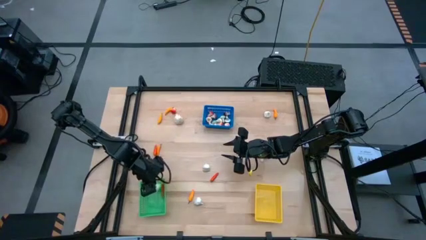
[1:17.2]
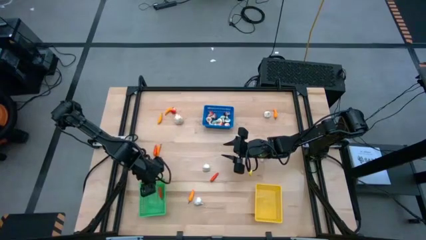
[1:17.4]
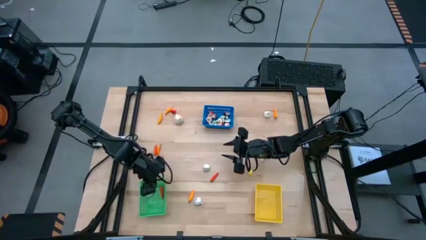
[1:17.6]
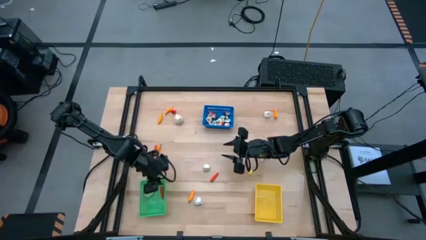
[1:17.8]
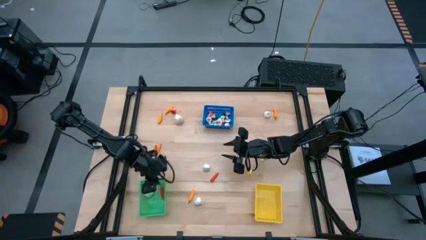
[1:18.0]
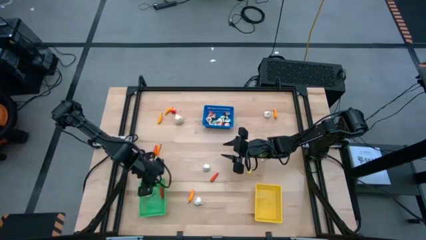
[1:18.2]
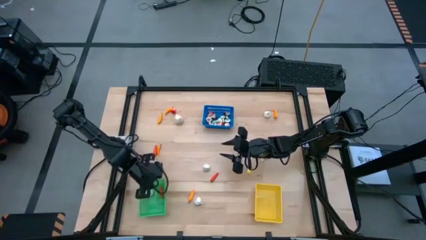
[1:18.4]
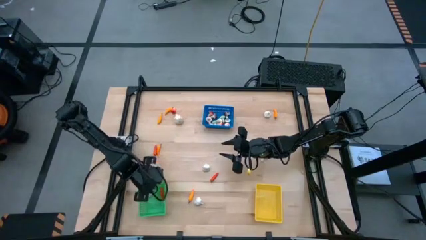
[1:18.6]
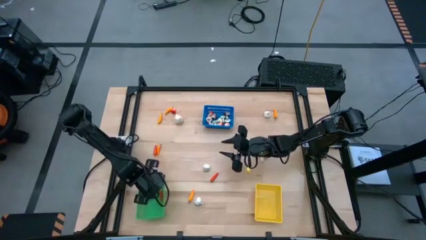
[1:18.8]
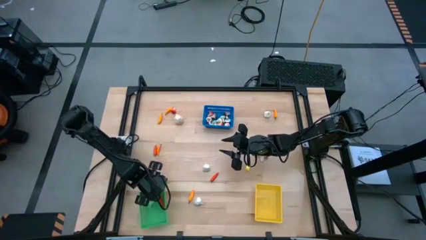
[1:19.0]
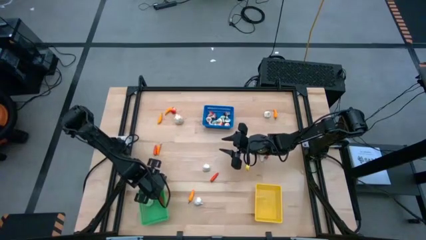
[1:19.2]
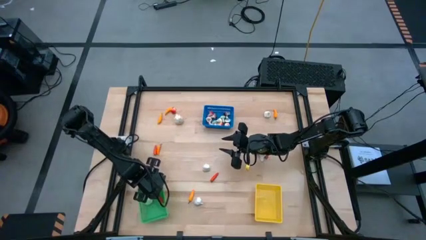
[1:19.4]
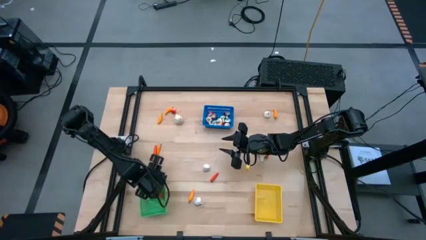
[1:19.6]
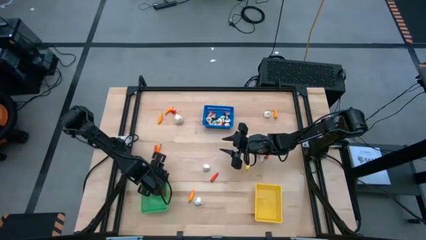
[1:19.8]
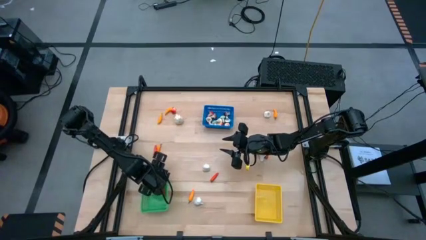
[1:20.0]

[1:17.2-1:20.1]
Task: Sort produce into baskets
Adjust the green bin

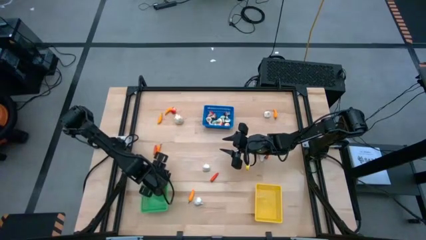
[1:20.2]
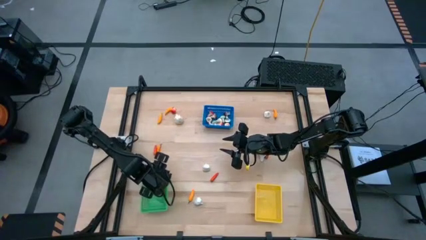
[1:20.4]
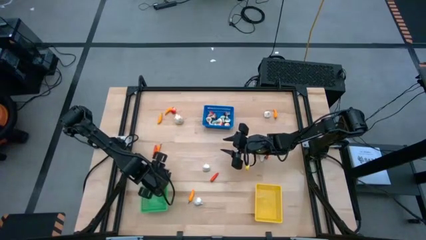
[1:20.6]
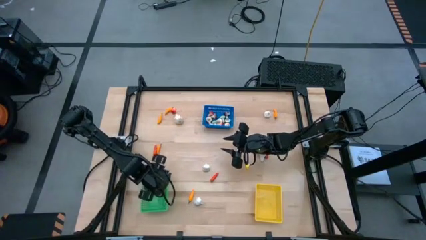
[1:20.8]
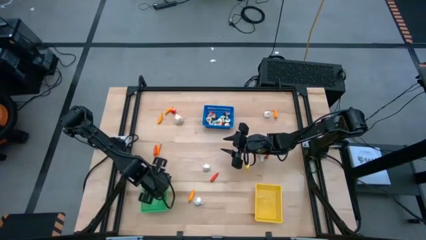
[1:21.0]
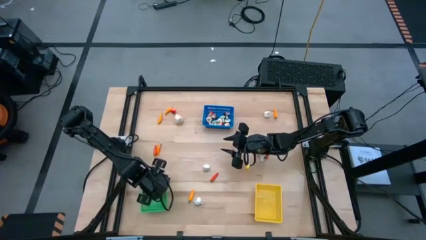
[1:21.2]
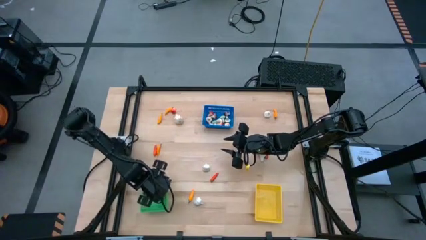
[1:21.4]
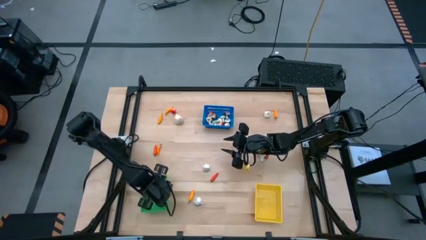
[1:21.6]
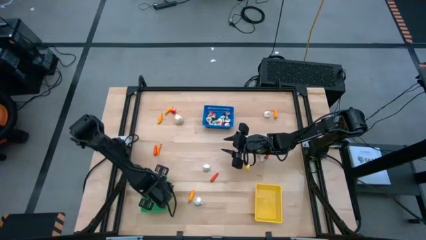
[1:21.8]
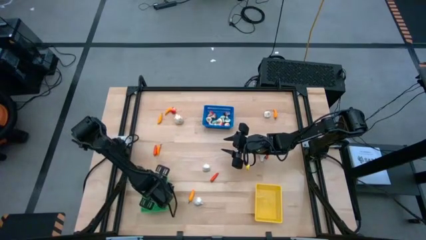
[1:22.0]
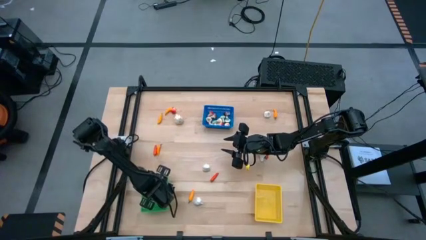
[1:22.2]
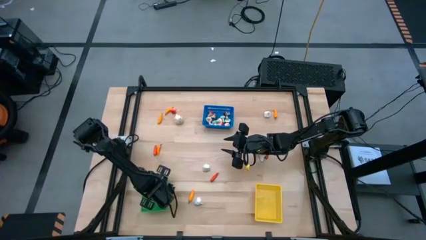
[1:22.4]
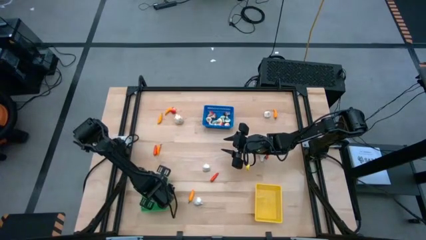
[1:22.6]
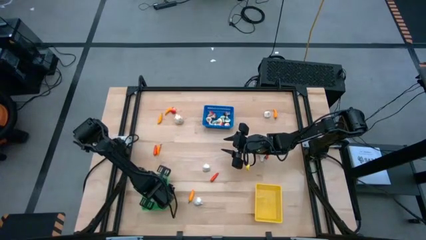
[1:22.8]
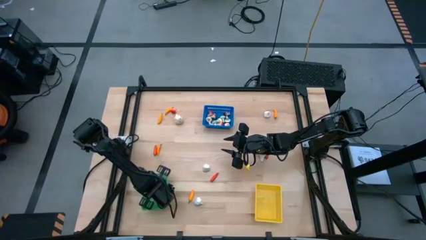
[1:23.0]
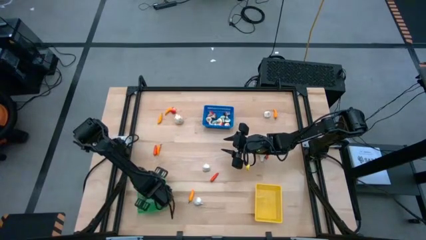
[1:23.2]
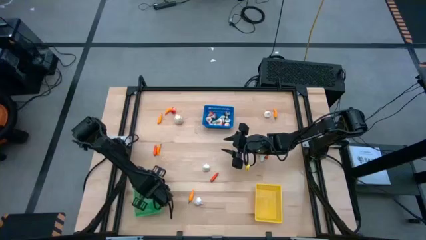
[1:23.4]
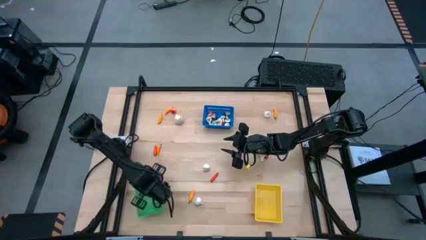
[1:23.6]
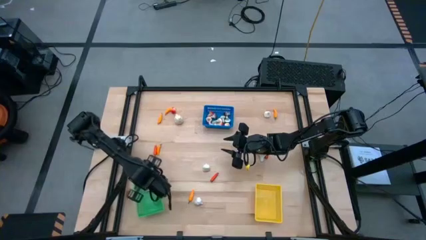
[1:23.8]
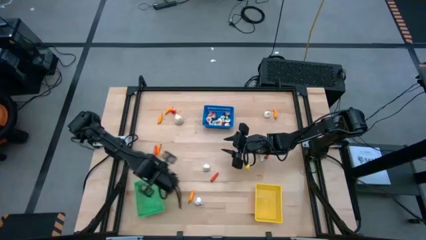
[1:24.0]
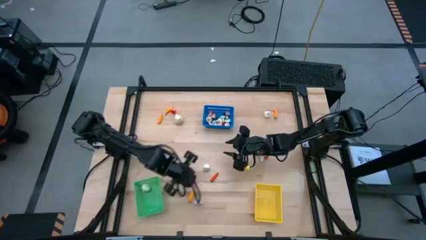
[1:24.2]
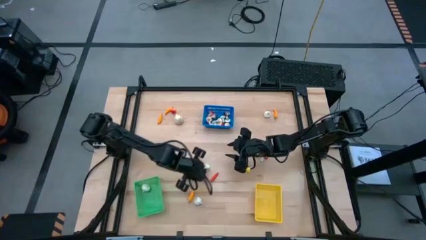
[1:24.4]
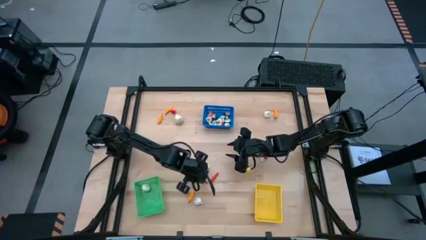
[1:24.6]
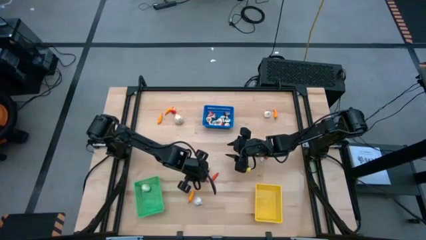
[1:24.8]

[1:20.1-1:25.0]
Remove the red chili pepper from the green bin into the table

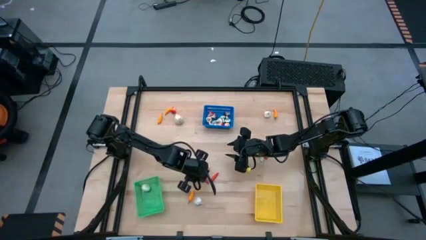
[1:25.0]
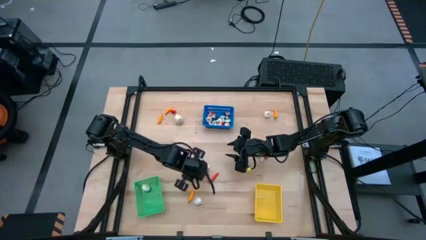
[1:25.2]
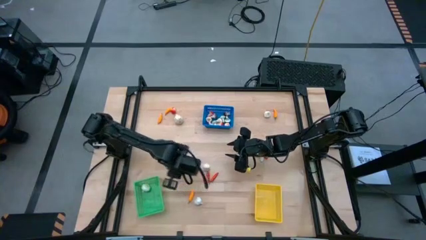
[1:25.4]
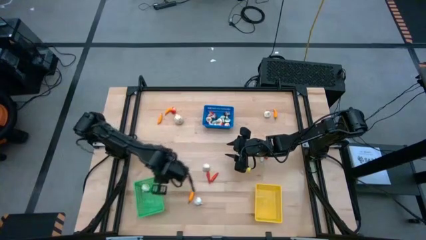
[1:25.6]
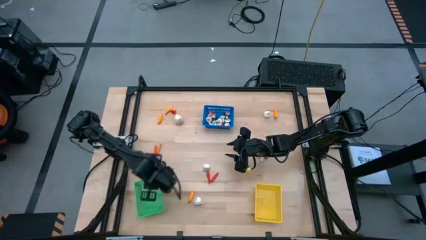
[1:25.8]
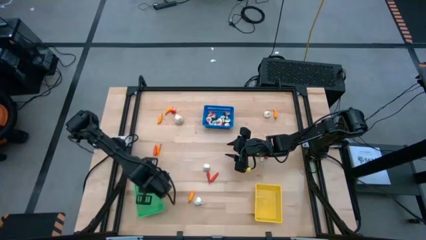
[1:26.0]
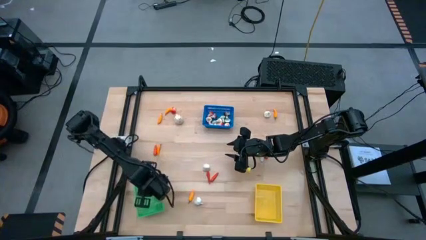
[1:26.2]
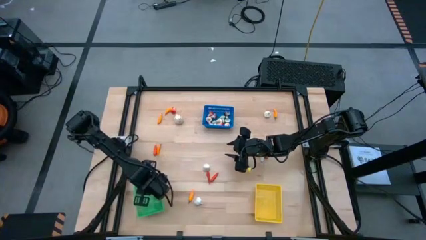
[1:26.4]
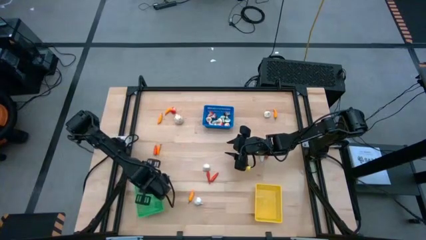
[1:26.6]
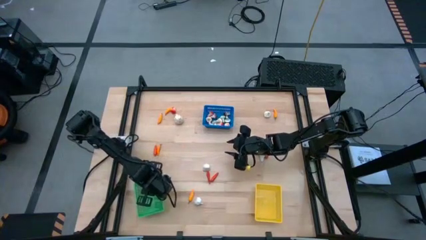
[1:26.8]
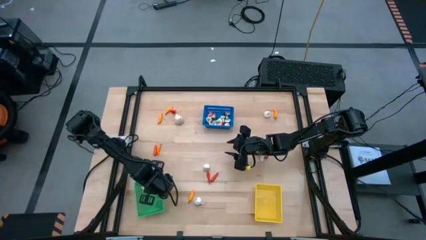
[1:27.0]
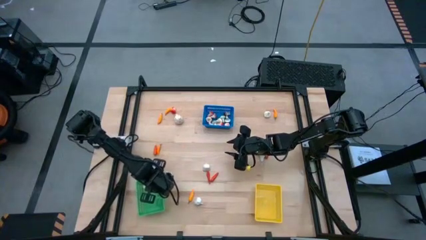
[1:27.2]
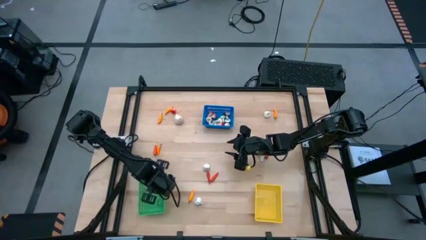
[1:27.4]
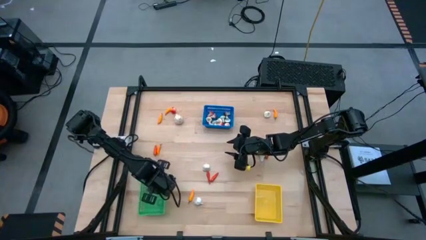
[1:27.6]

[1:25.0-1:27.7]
Adjust the green bin

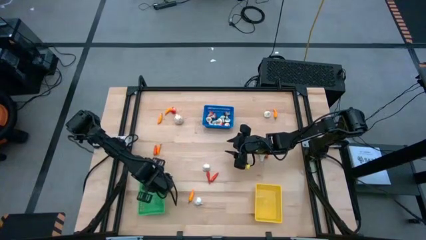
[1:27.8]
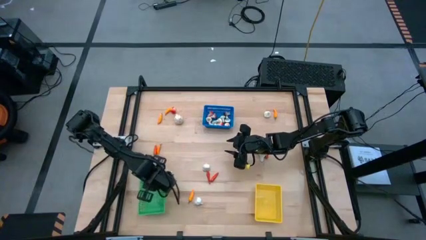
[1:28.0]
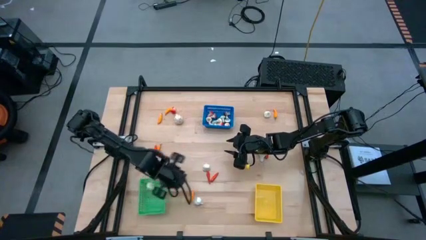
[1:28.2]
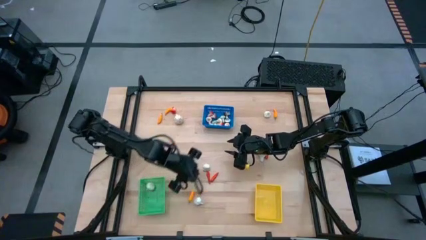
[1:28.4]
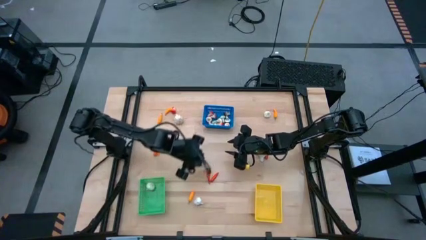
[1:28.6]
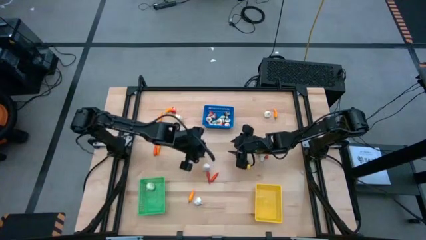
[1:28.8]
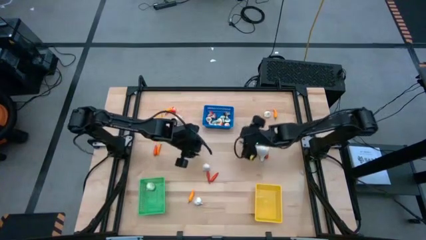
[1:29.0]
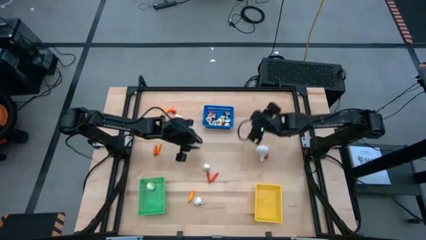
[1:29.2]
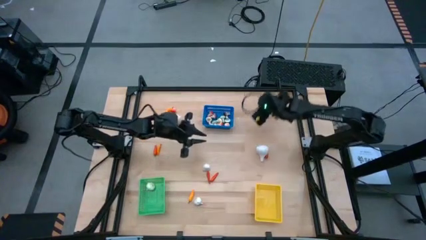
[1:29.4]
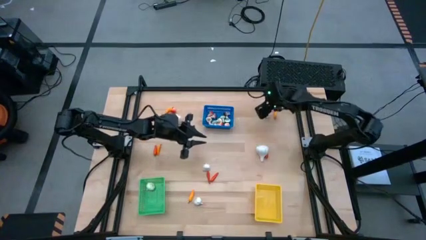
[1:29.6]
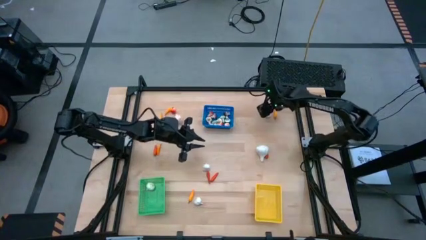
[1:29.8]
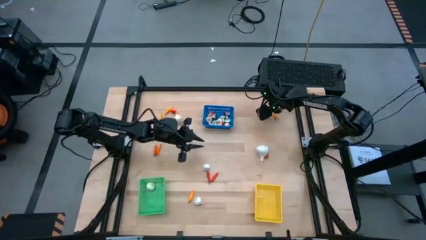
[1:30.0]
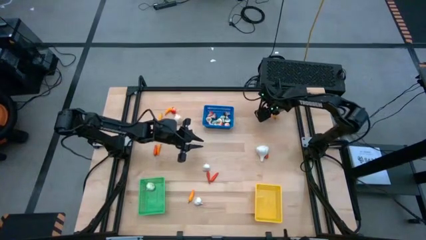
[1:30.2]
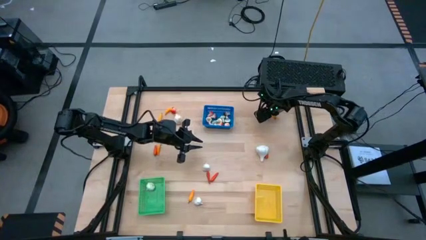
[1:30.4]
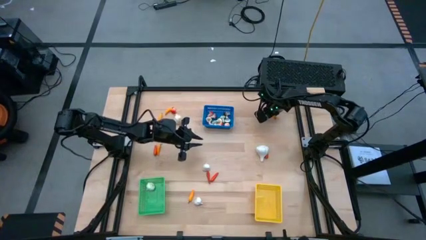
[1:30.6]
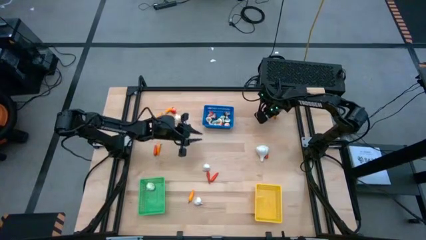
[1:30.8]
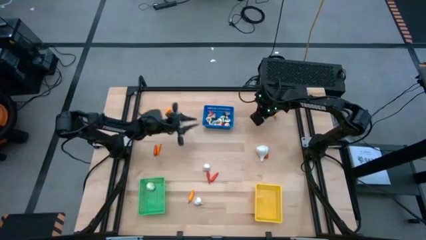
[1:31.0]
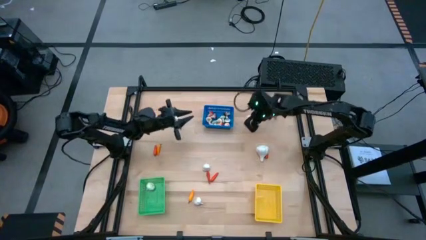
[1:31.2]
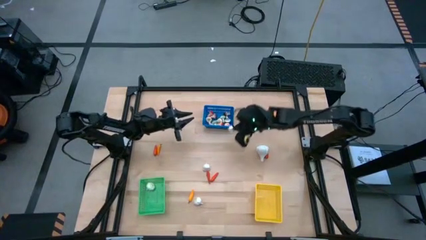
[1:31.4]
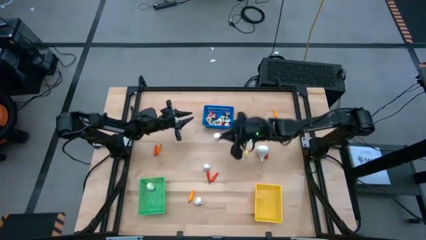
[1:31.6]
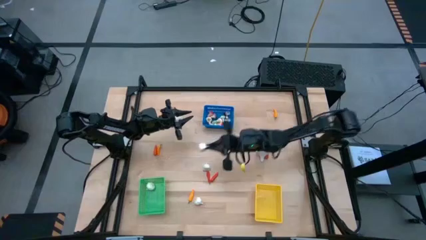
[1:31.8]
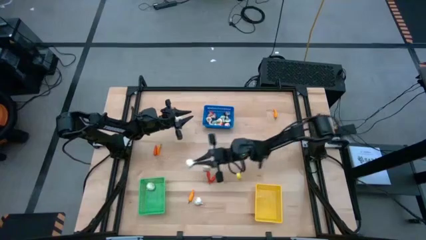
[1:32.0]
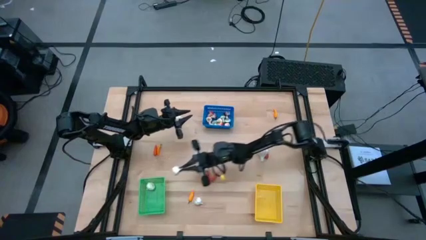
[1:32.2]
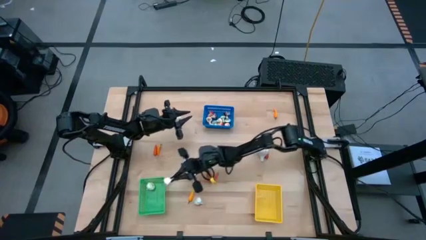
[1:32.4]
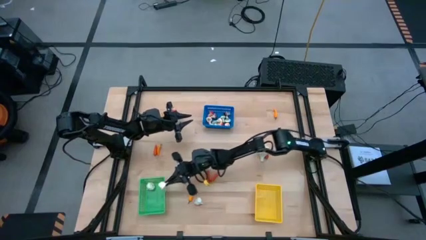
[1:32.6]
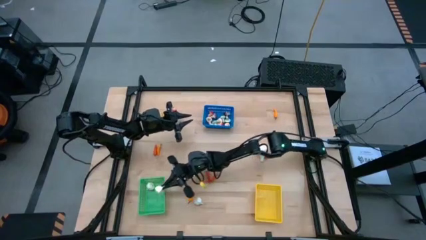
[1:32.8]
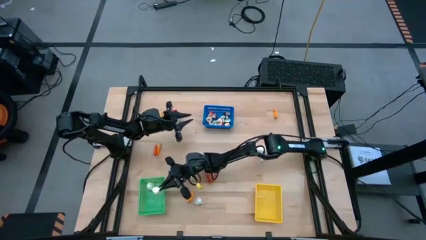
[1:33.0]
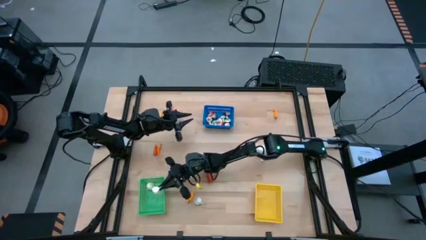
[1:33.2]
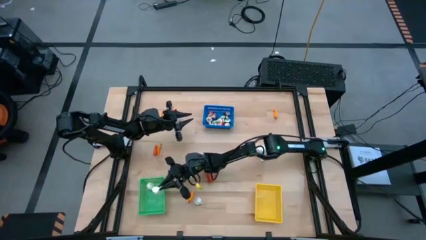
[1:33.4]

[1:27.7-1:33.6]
Put the white garlic into the green bin

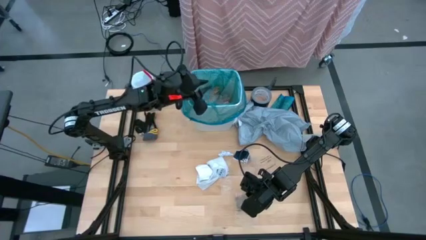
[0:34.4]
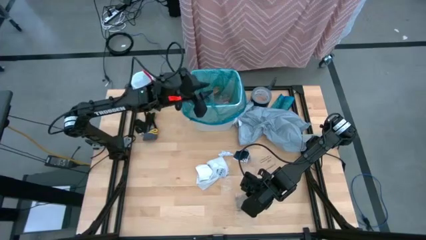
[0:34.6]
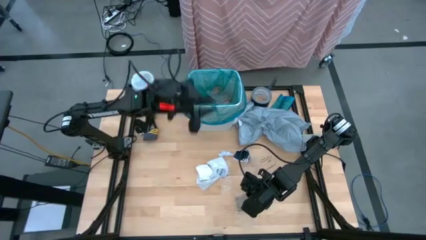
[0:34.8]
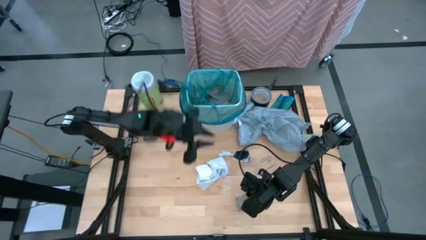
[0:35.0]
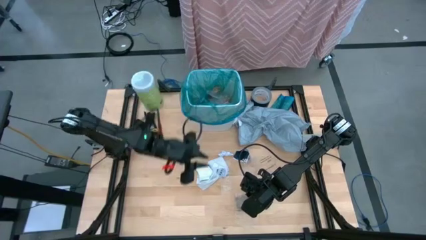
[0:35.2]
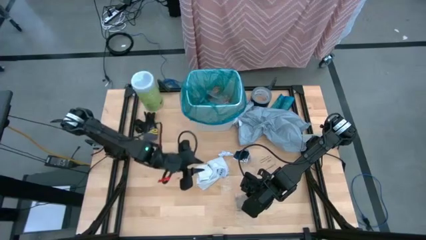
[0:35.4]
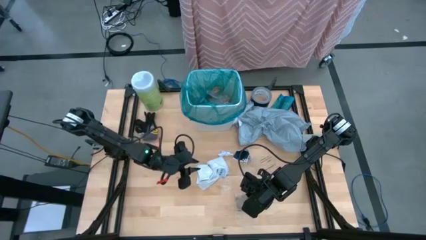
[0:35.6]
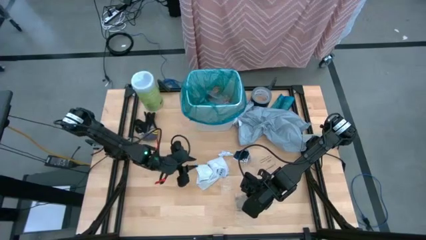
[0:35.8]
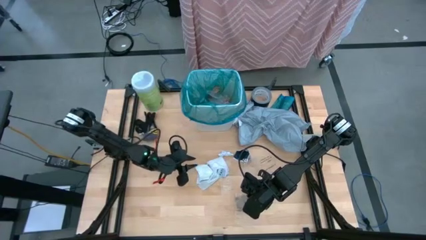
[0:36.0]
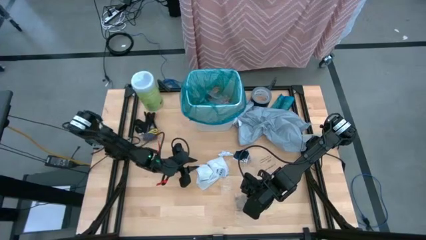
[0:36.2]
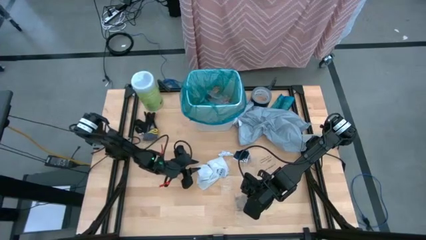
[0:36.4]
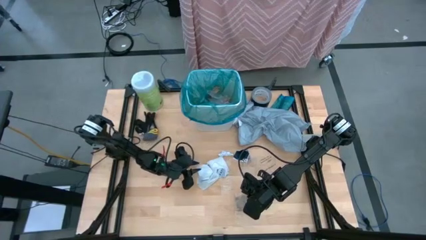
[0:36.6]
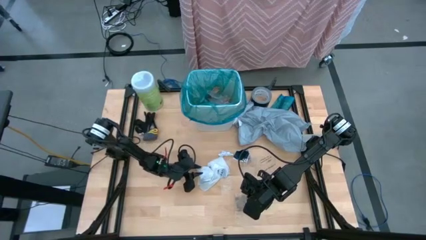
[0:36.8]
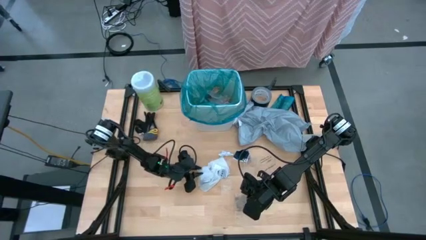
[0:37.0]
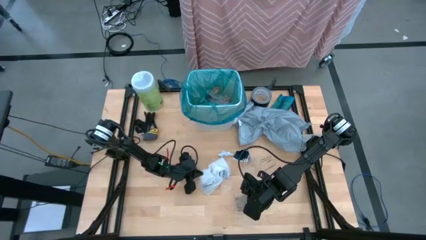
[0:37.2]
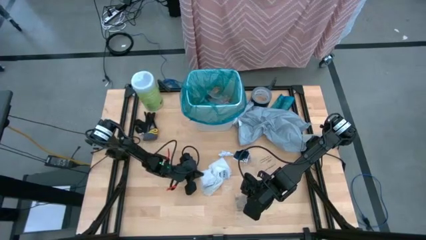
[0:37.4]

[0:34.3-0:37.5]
Task: place trash/remove bag and relplace
Put the white paper into the trash bin
